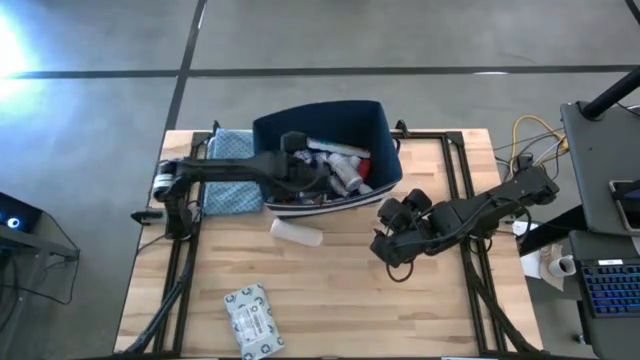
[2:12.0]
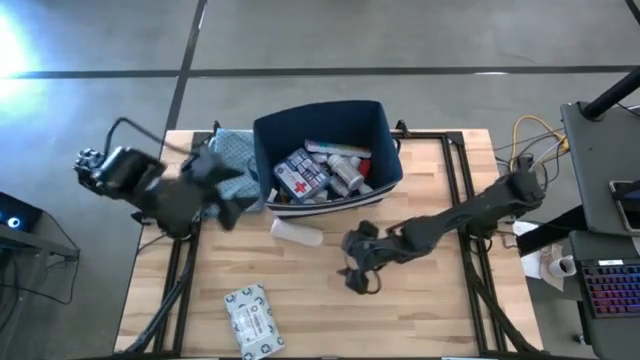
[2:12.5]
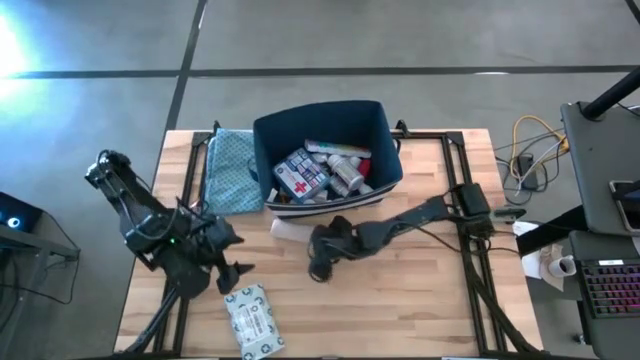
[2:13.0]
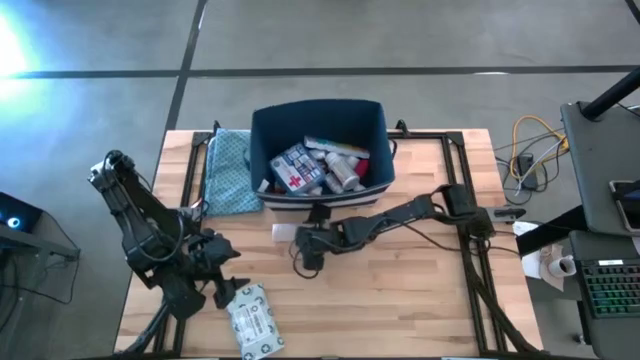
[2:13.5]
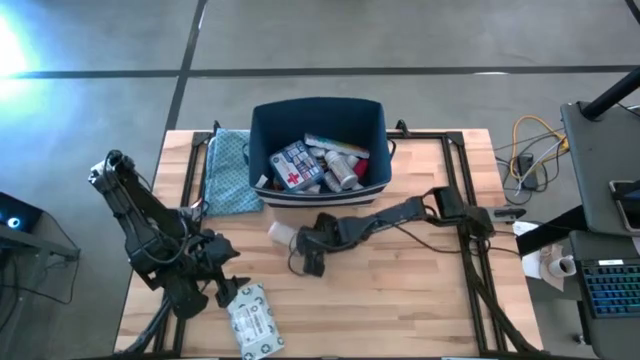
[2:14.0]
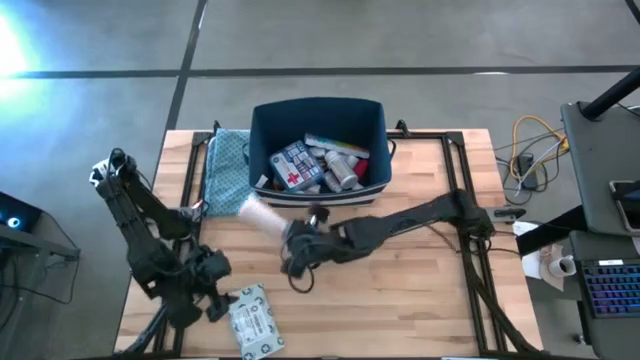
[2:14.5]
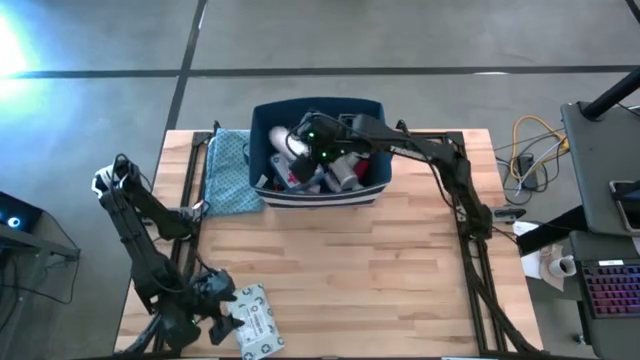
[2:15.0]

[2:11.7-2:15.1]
Task: Pick & place medical supplies in basket/bin
Put the light brown bandage into the blue bin

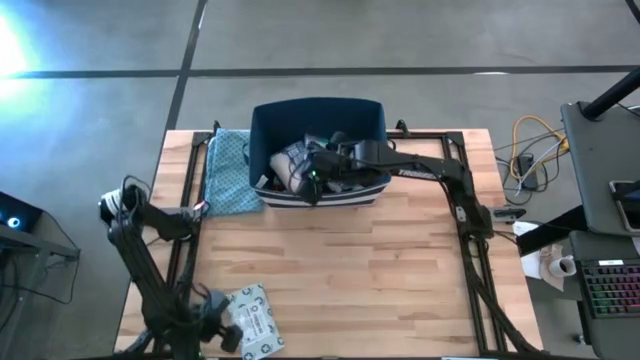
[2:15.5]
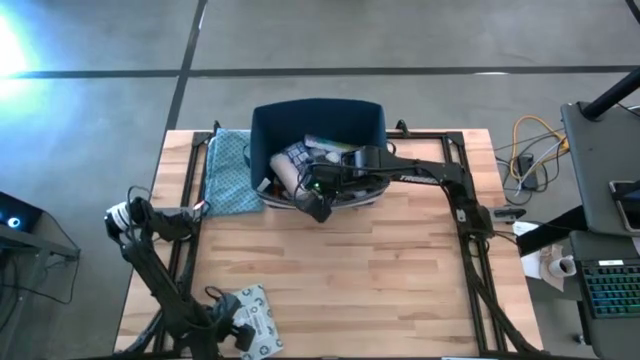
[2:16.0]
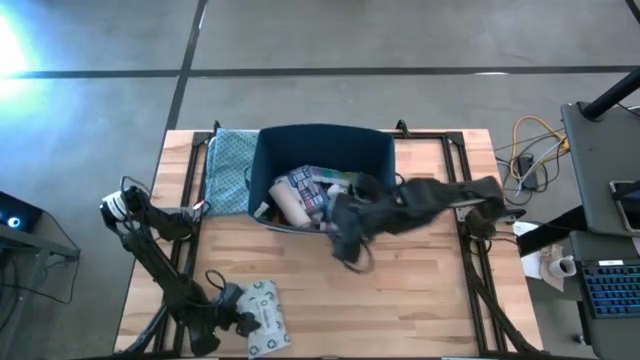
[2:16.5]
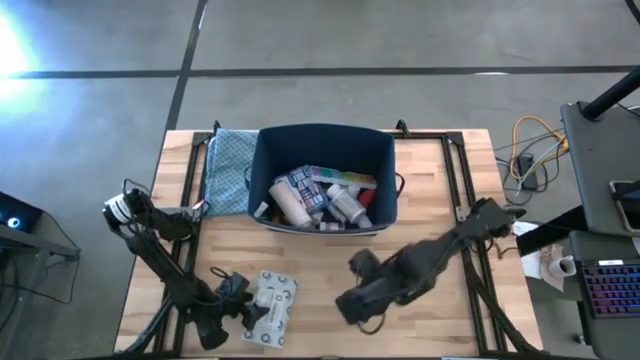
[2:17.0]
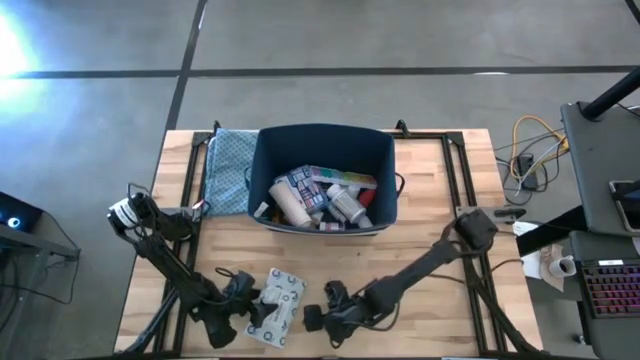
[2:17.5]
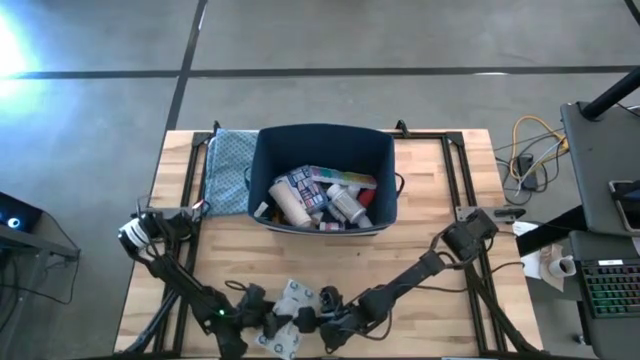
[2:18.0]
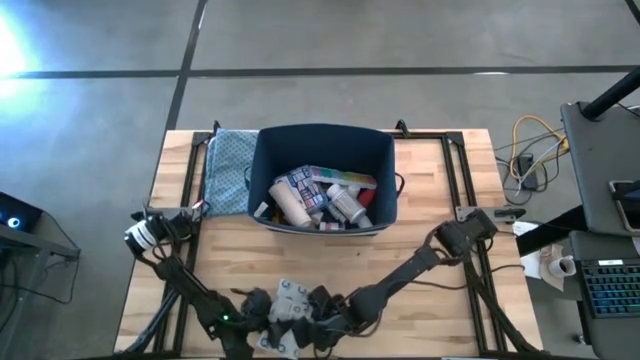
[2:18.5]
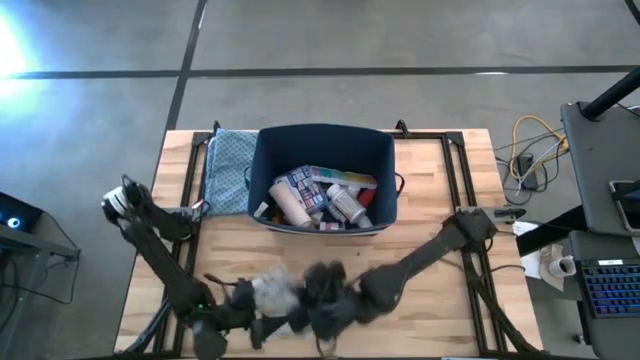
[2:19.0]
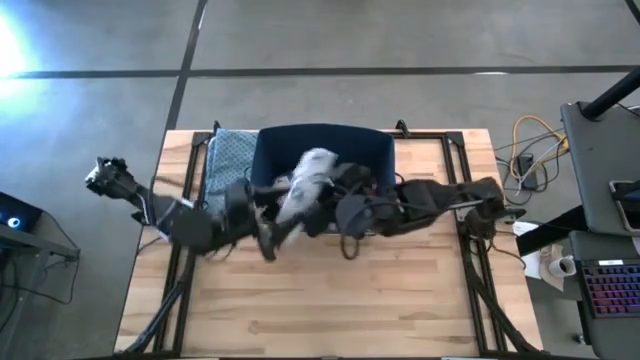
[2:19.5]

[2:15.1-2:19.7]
Put the mailer bag into the blue bin

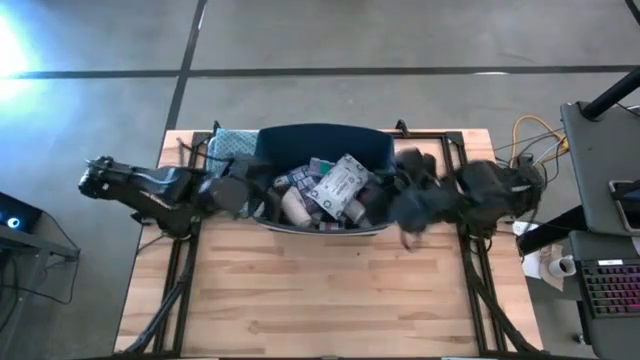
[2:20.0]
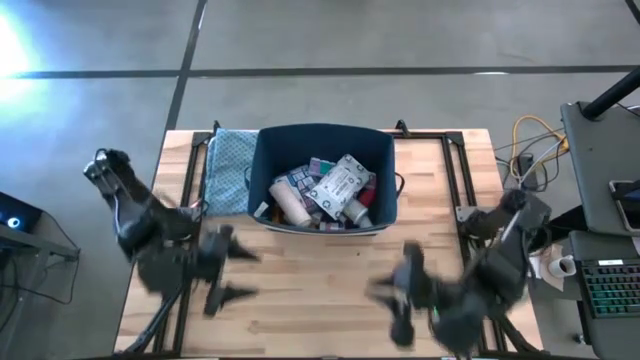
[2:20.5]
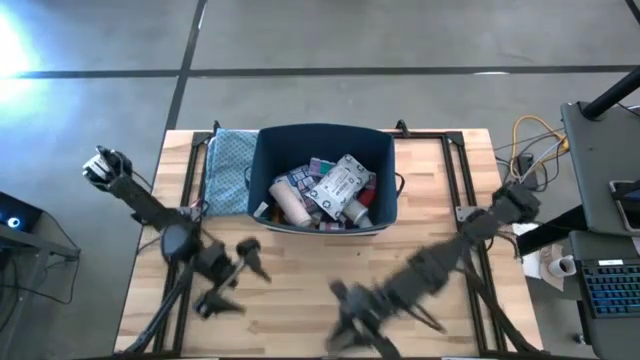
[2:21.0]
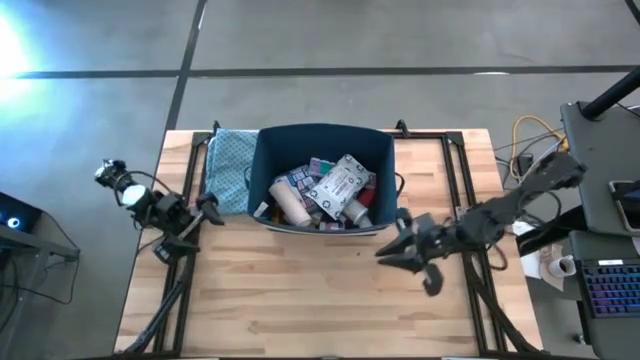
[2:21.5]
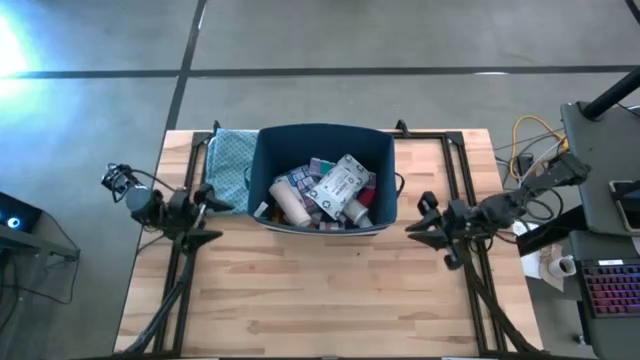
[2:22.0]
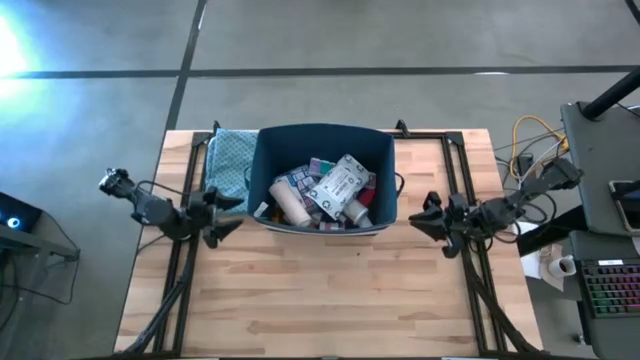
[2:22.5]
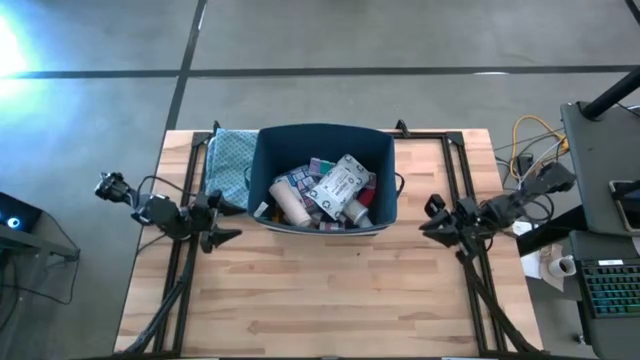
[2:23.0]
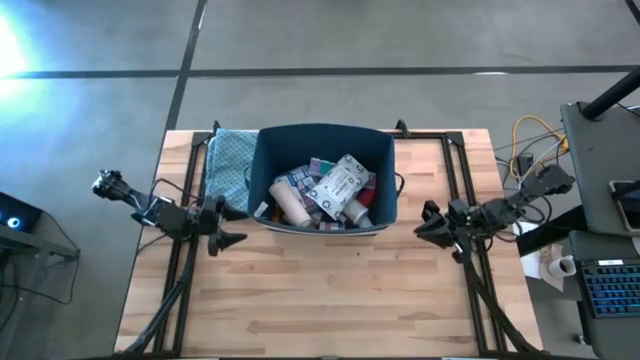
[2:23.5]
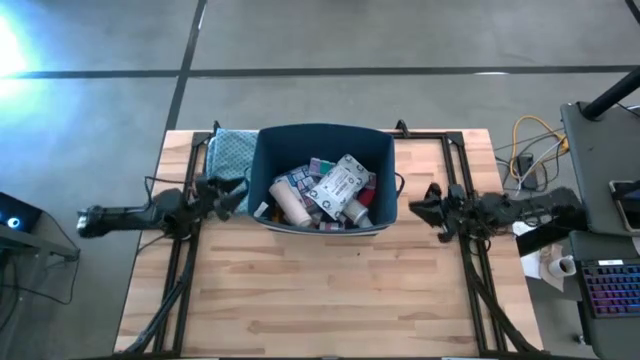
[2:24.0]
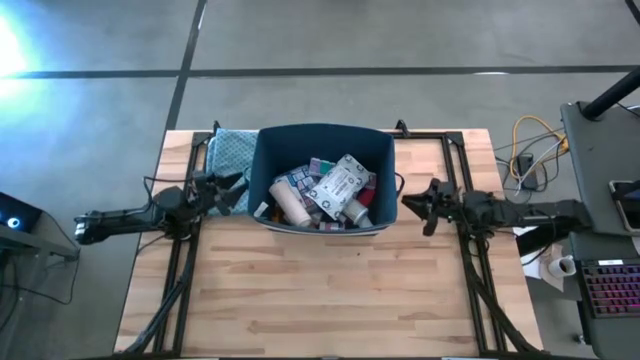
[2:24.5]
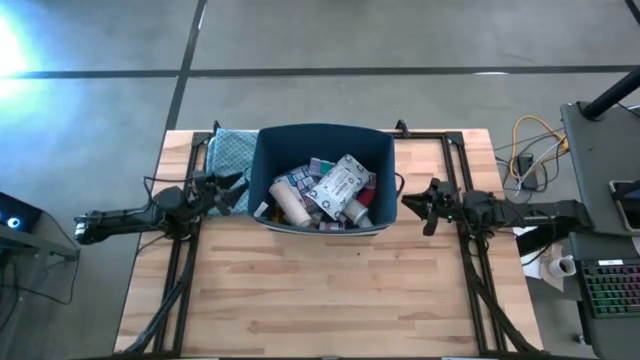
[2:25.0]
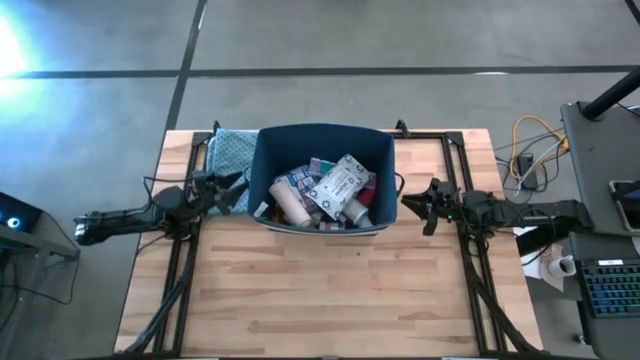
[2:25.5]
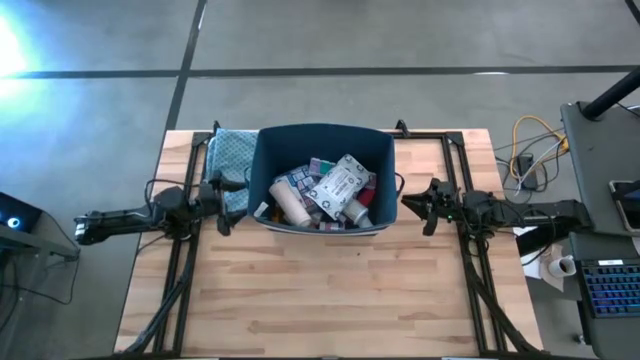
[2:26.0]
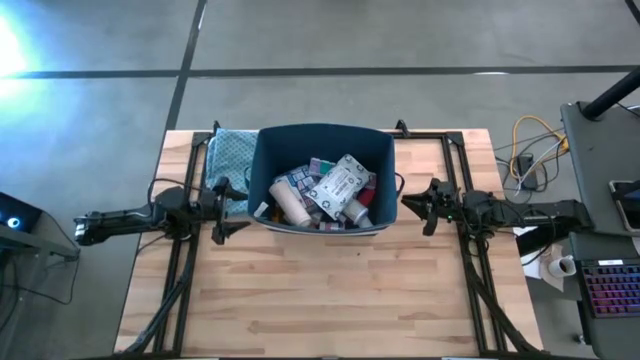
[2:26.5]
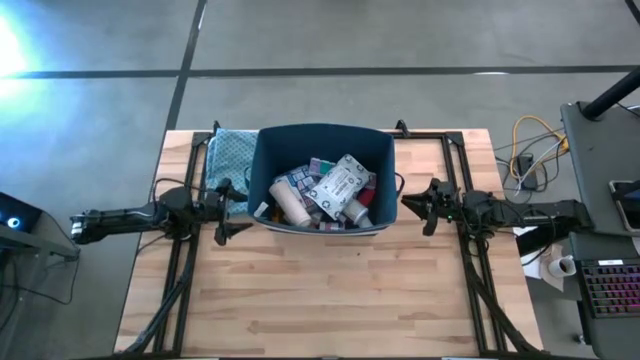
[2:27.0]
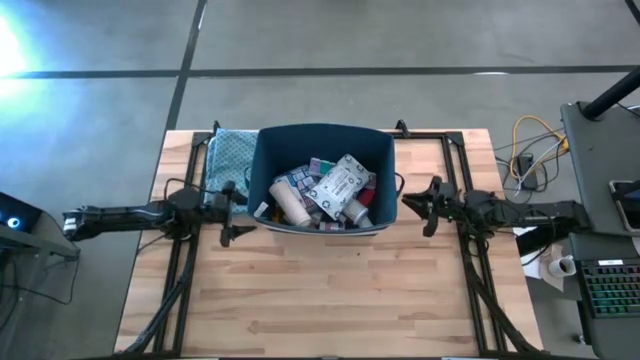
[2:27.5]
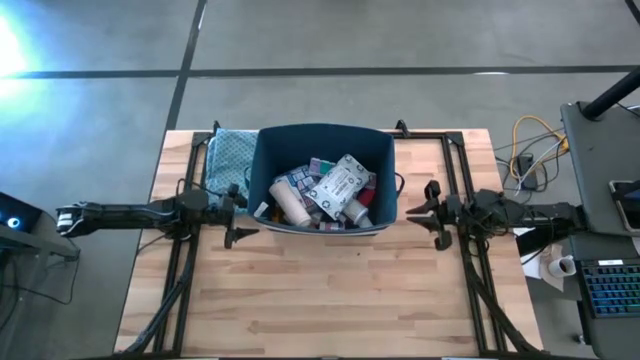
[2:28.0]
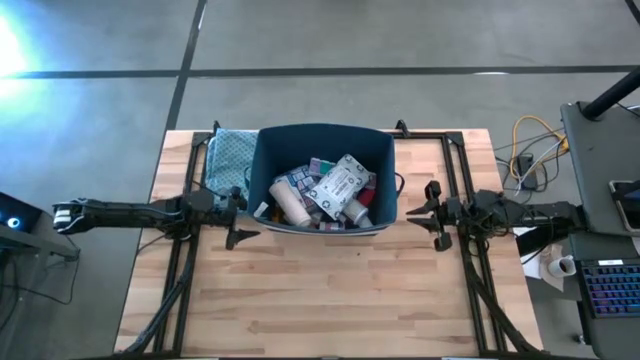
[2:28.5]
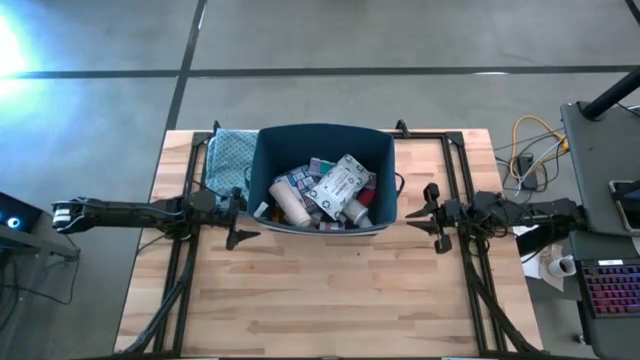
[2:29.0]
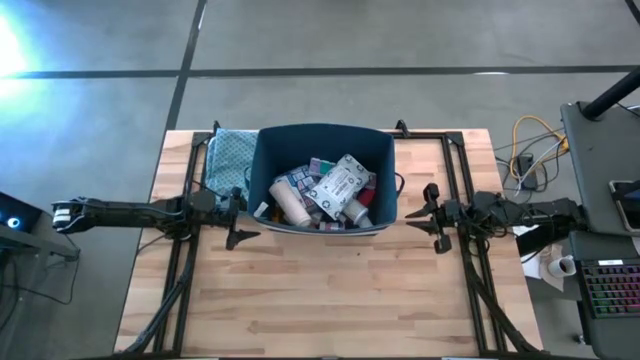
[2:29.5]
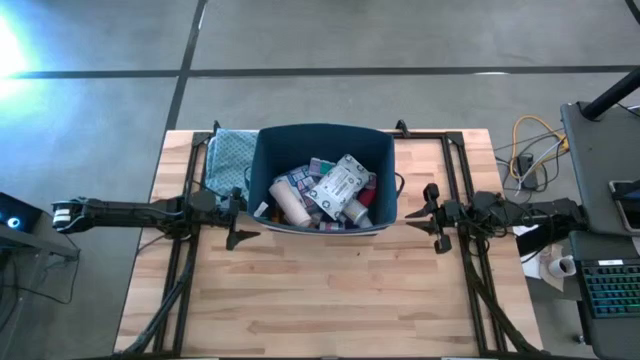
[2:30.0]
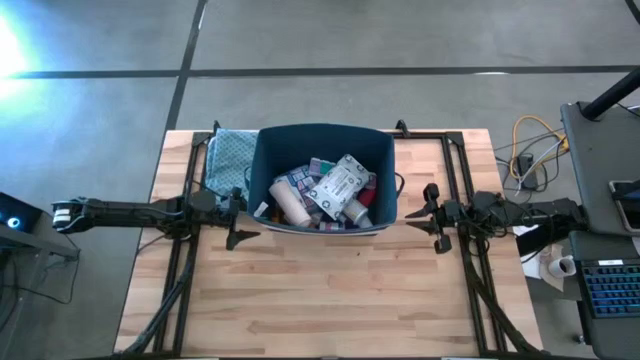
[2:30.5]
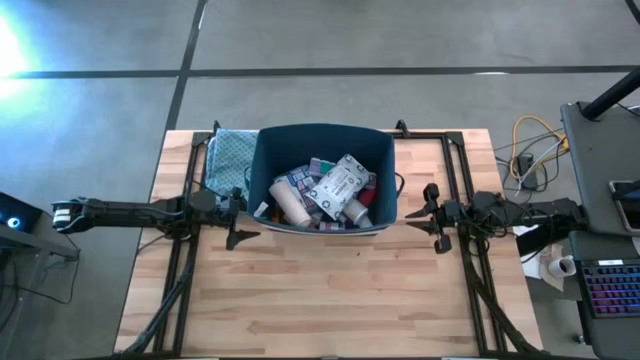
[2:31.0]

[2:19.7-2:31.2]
Return to Home Position

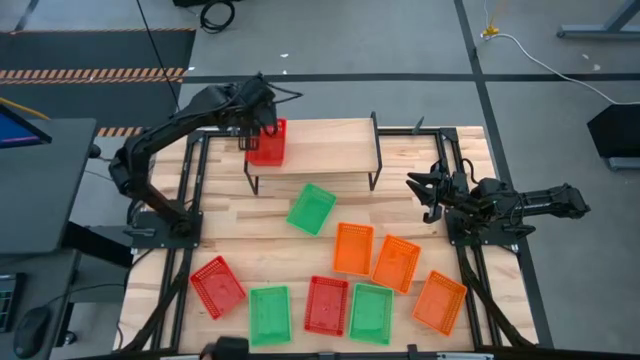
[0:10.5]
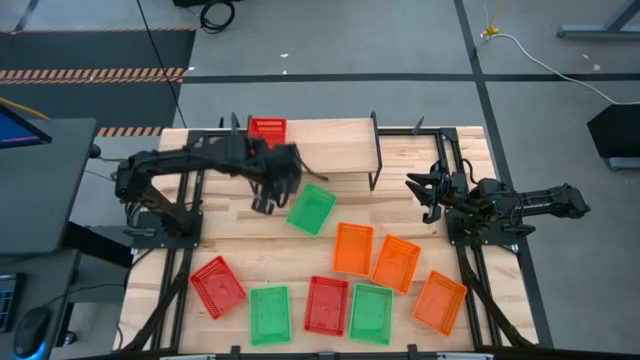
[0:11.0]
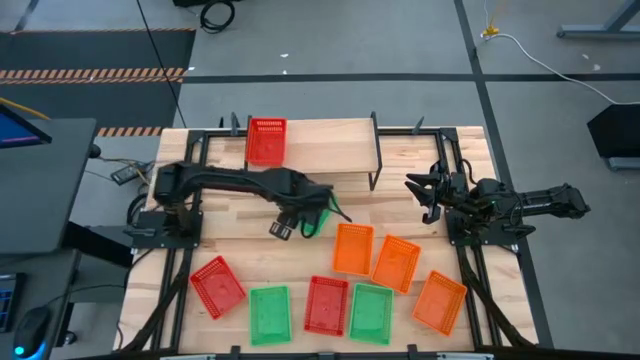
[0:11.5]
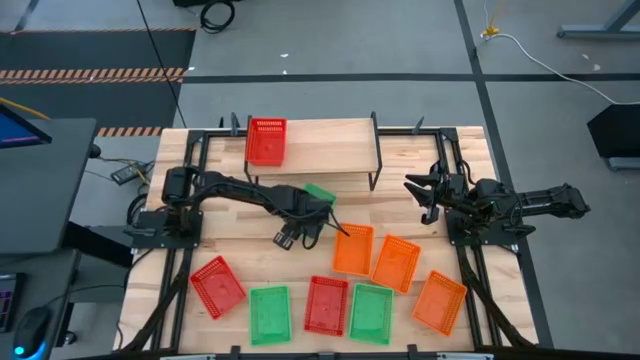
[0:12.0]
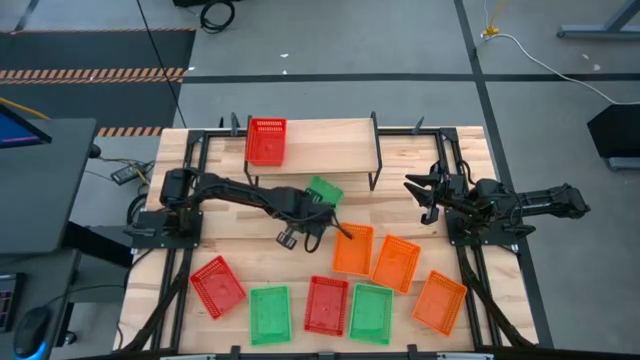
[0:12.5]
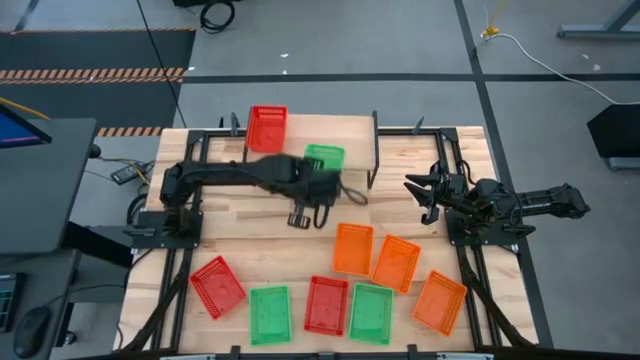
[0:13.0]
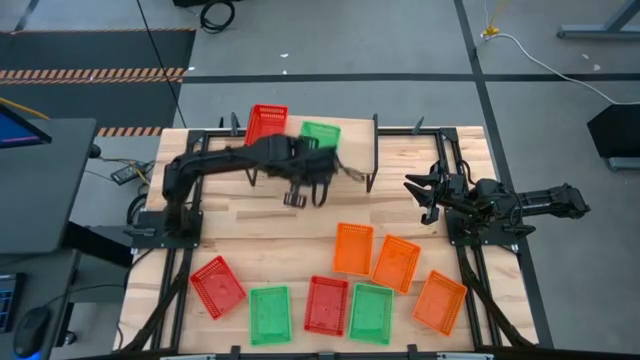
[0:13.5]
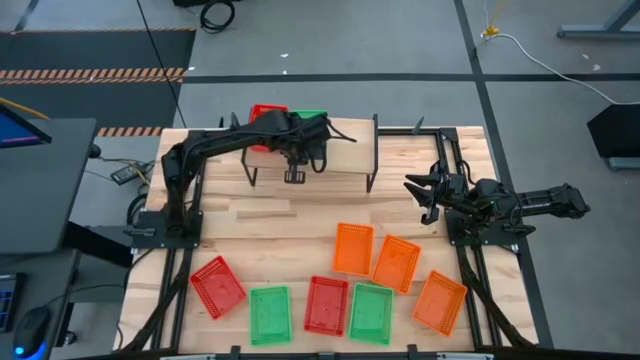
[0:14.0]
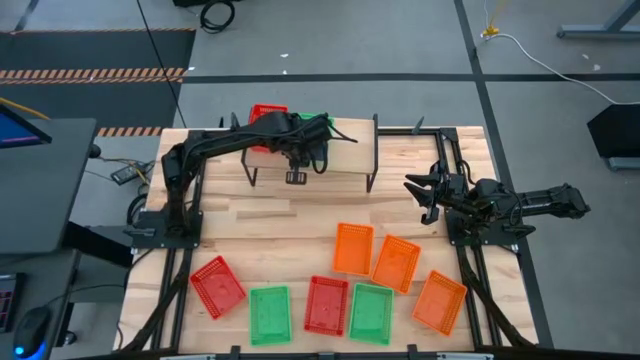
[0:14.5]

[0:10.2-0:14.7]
Task: Stack baskets on shelf by color
Put the top green basket on the shelf
